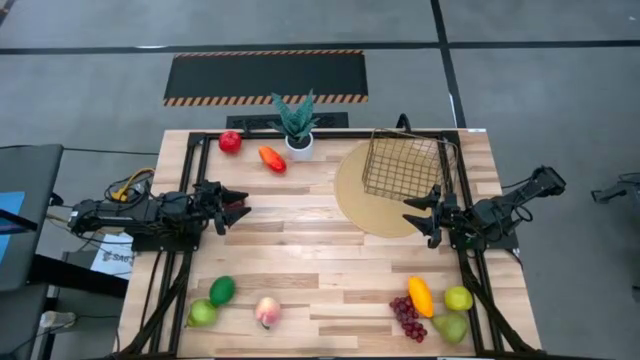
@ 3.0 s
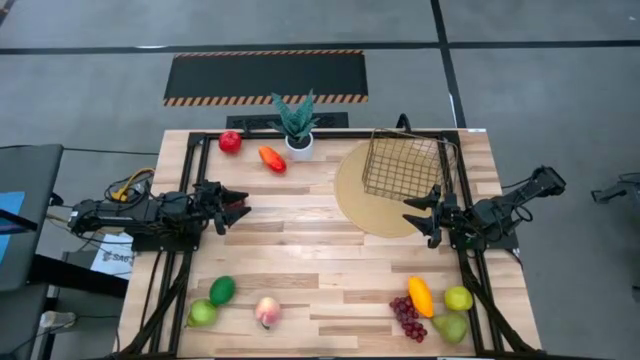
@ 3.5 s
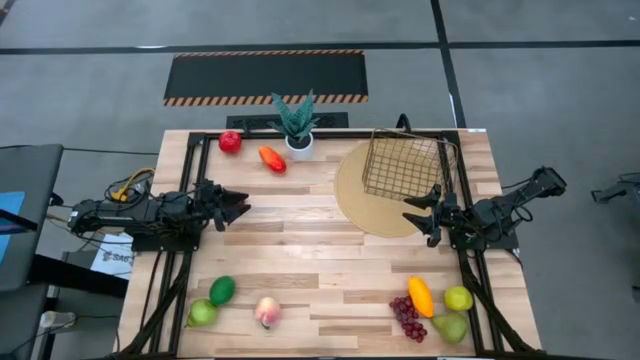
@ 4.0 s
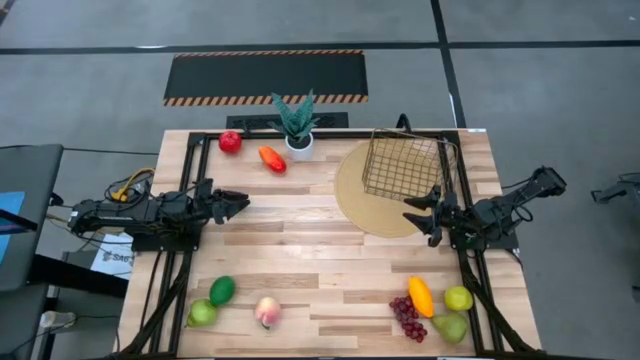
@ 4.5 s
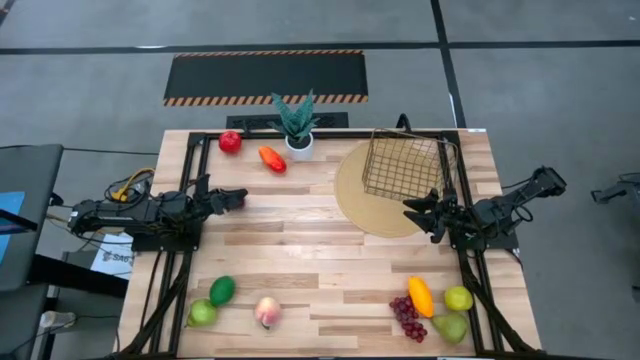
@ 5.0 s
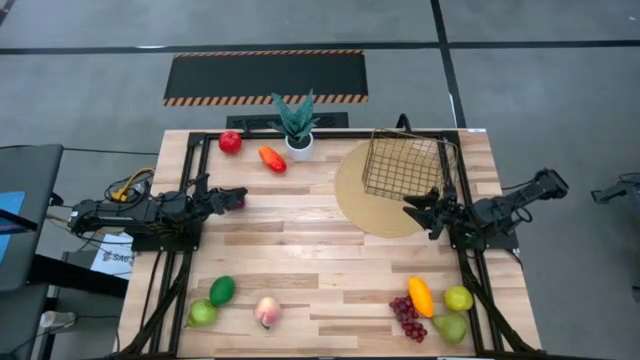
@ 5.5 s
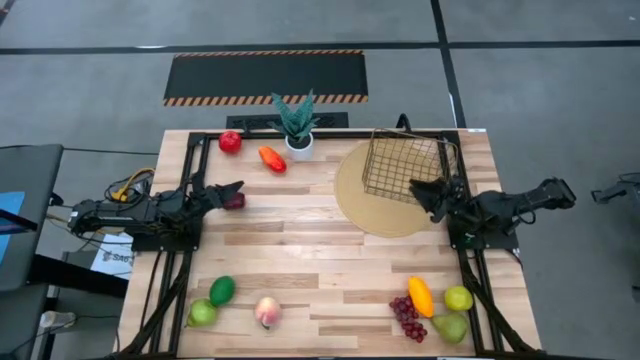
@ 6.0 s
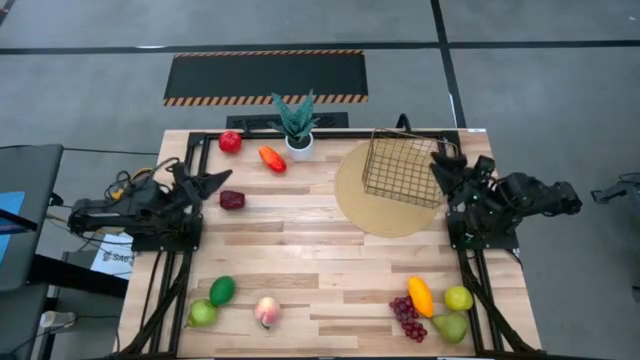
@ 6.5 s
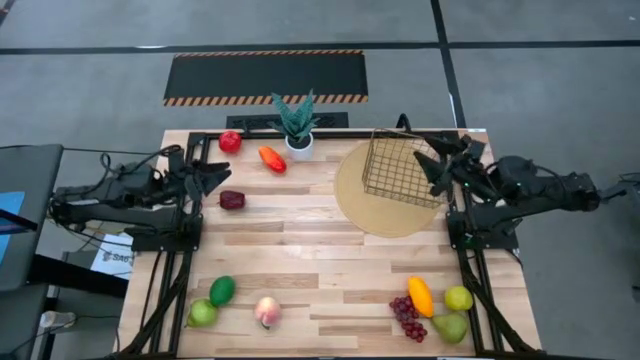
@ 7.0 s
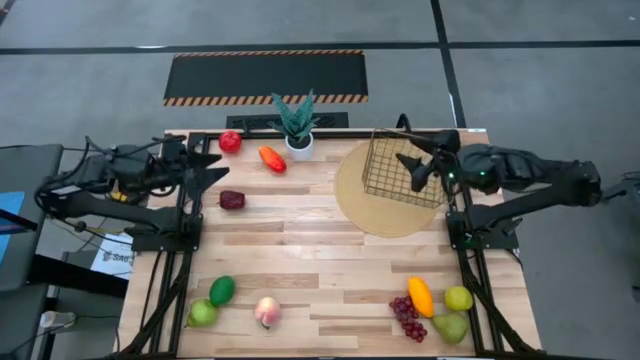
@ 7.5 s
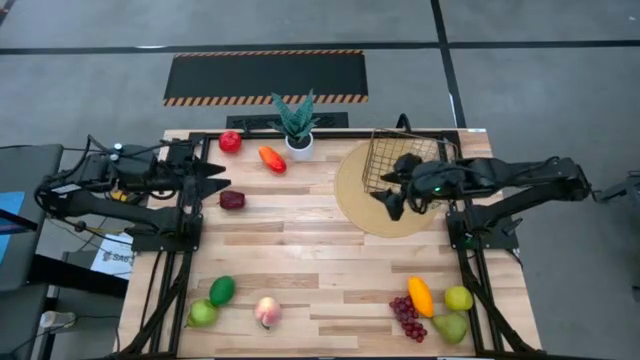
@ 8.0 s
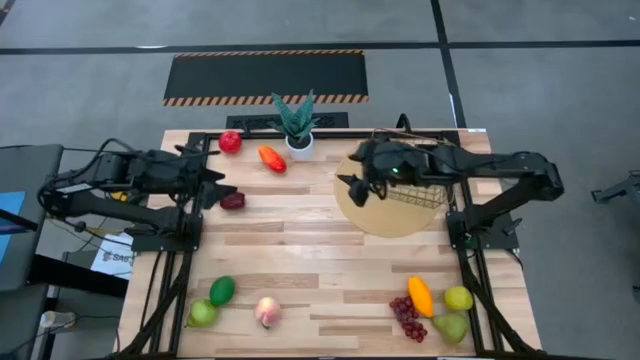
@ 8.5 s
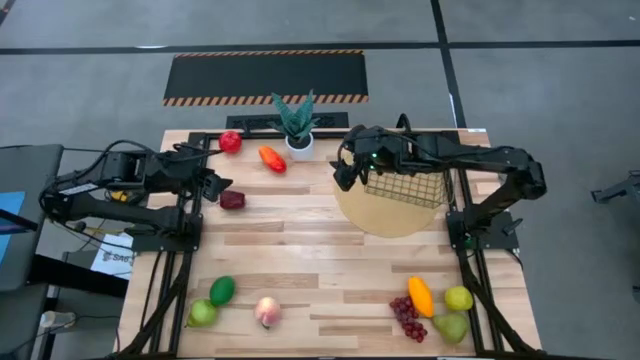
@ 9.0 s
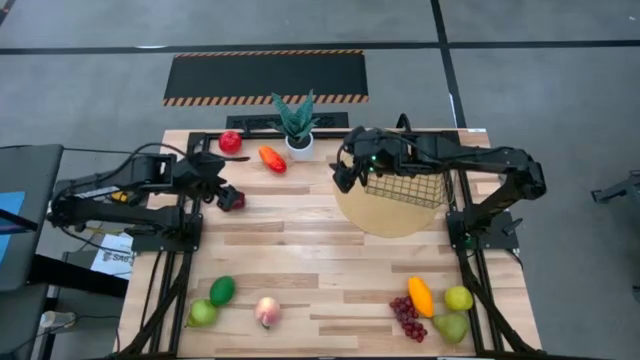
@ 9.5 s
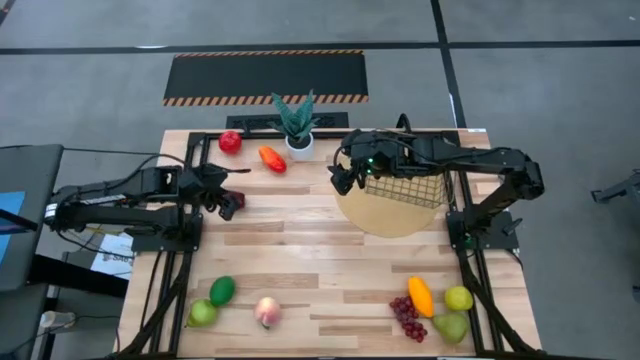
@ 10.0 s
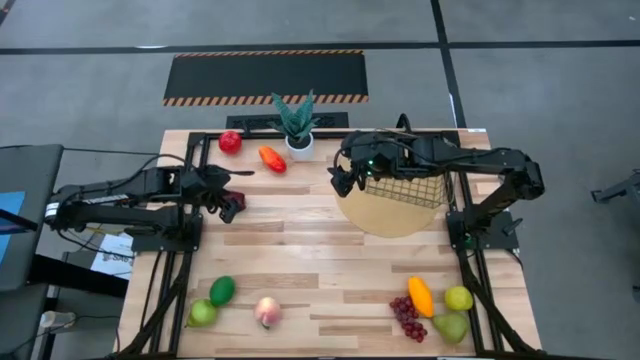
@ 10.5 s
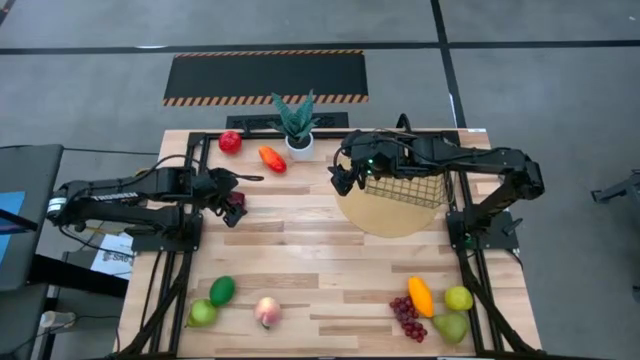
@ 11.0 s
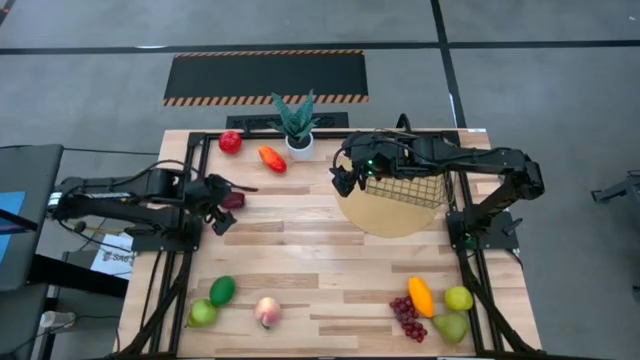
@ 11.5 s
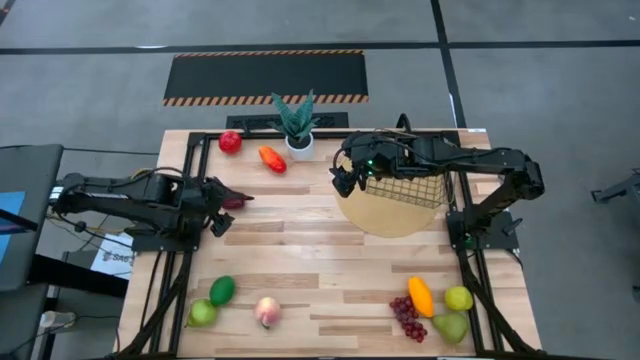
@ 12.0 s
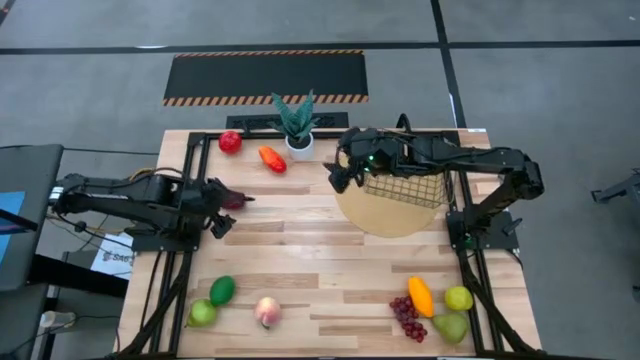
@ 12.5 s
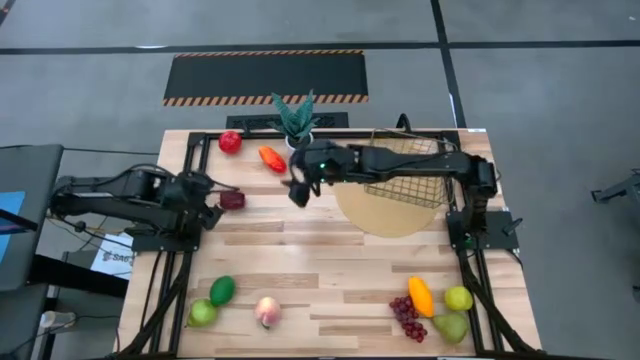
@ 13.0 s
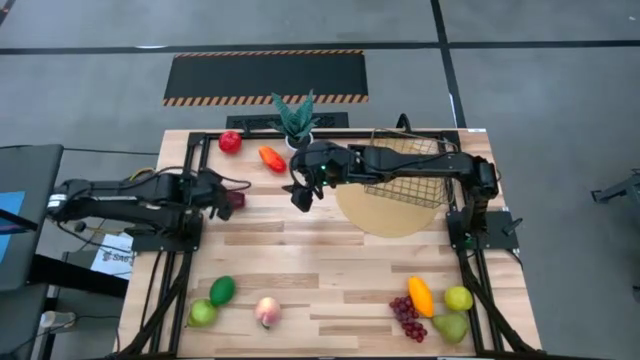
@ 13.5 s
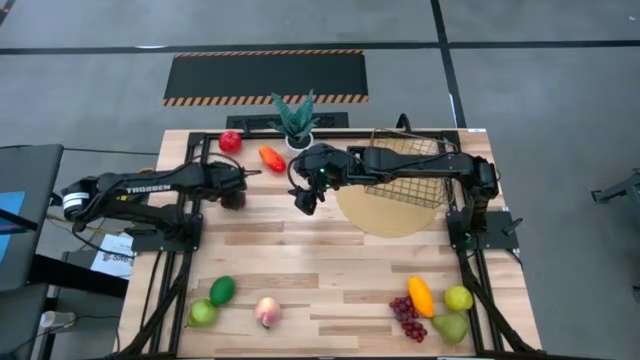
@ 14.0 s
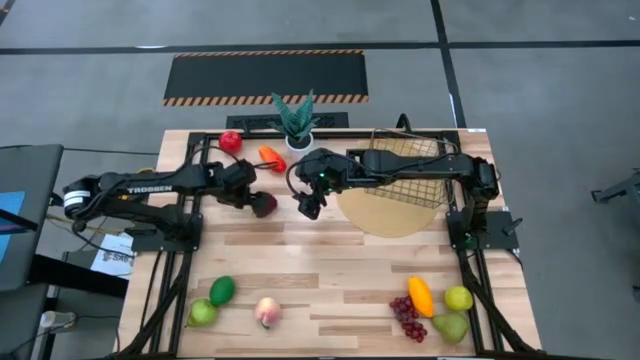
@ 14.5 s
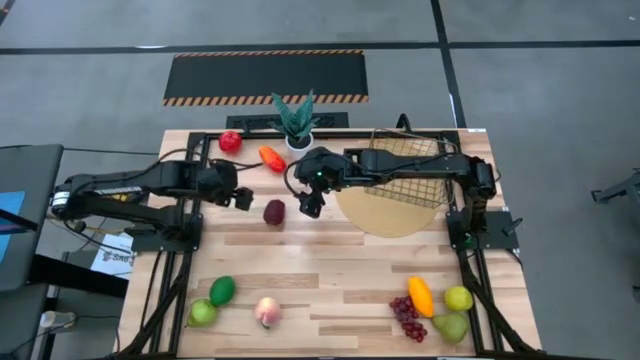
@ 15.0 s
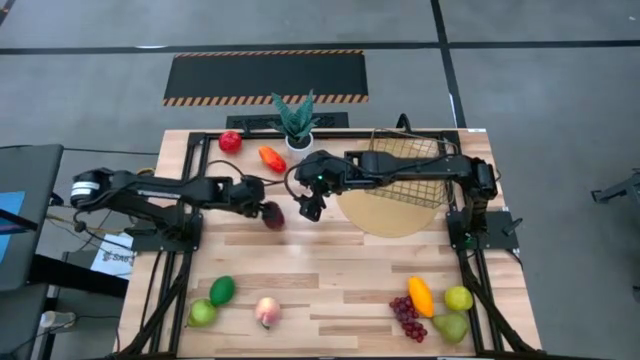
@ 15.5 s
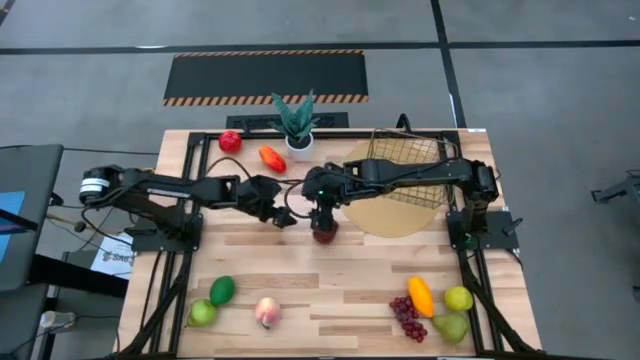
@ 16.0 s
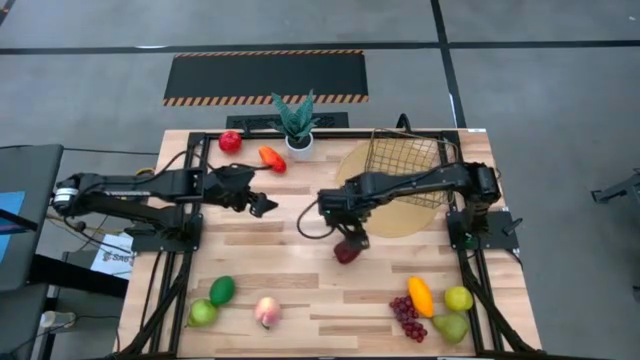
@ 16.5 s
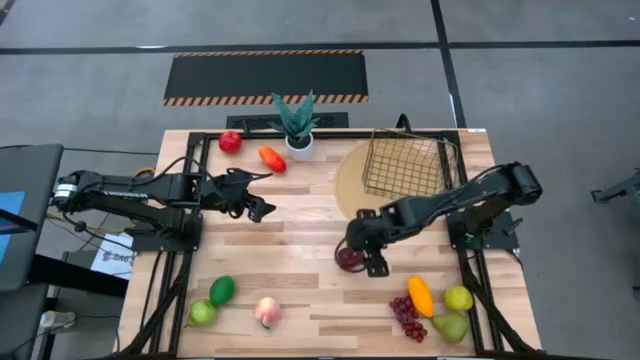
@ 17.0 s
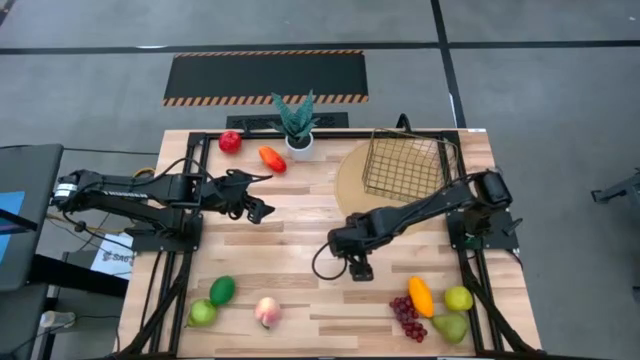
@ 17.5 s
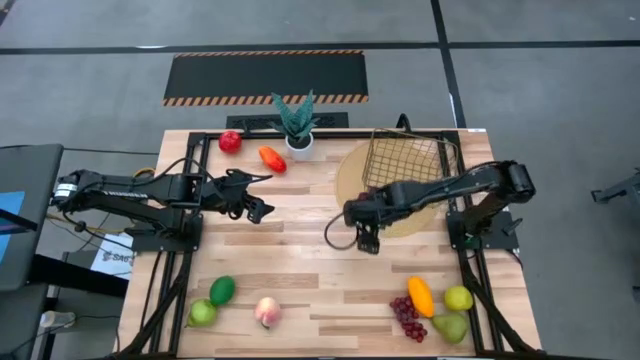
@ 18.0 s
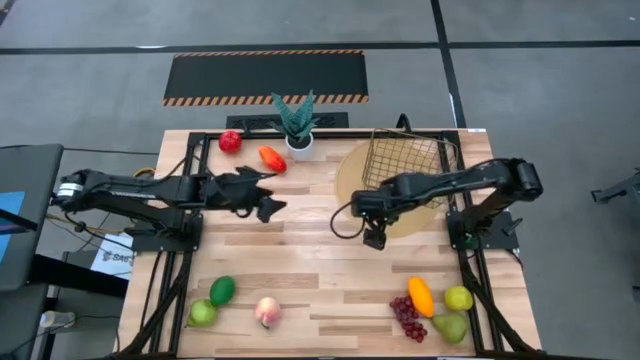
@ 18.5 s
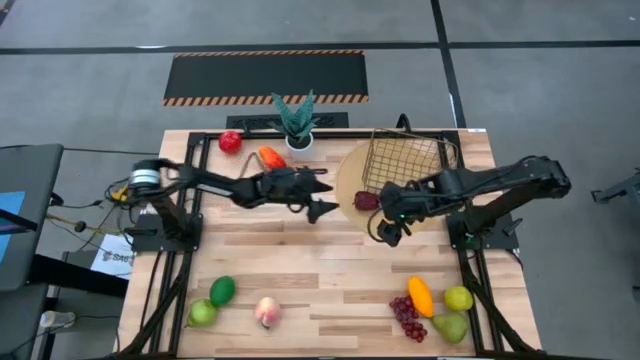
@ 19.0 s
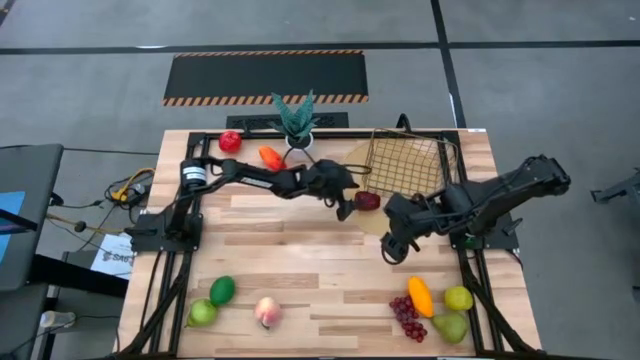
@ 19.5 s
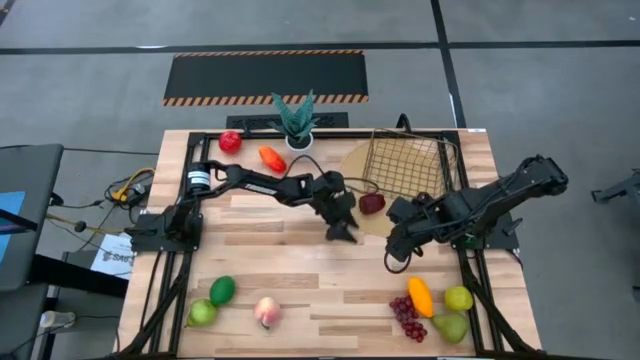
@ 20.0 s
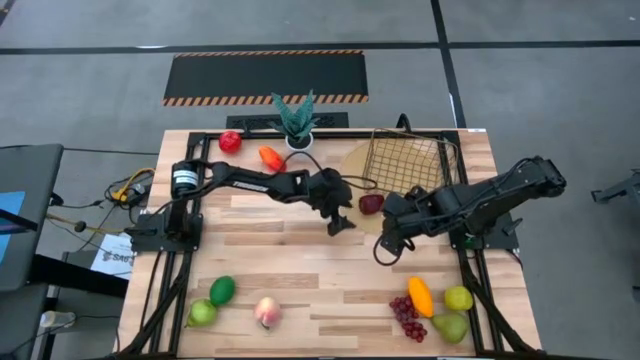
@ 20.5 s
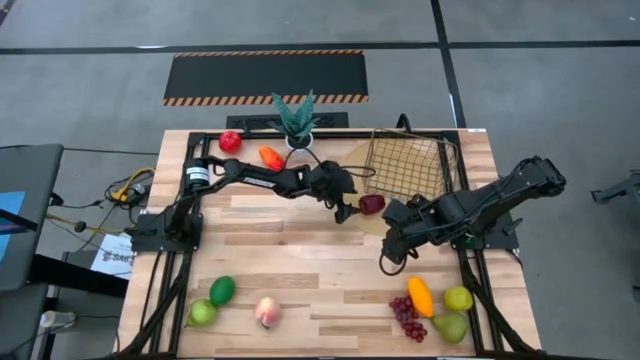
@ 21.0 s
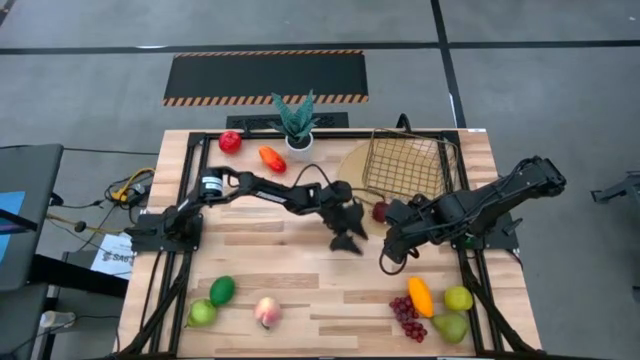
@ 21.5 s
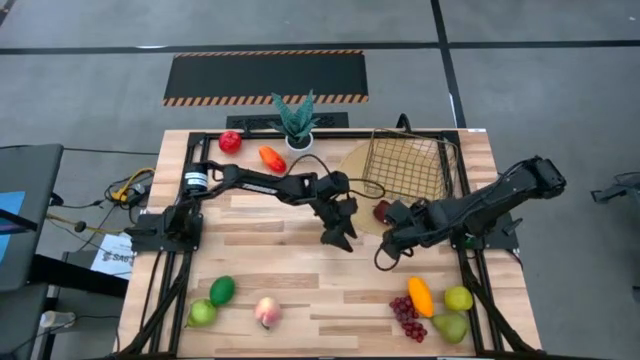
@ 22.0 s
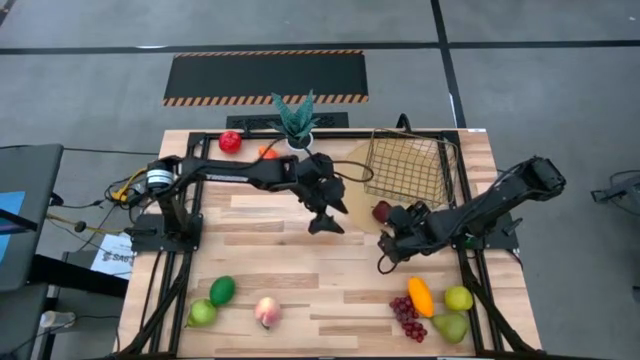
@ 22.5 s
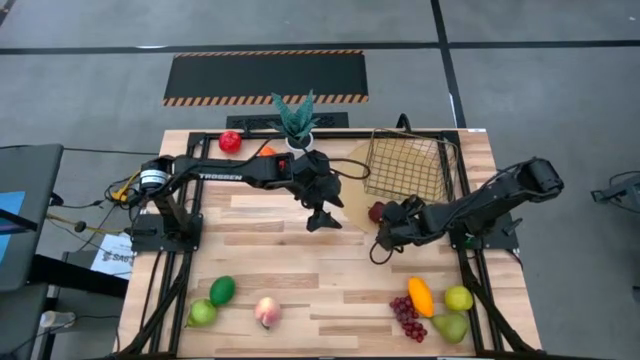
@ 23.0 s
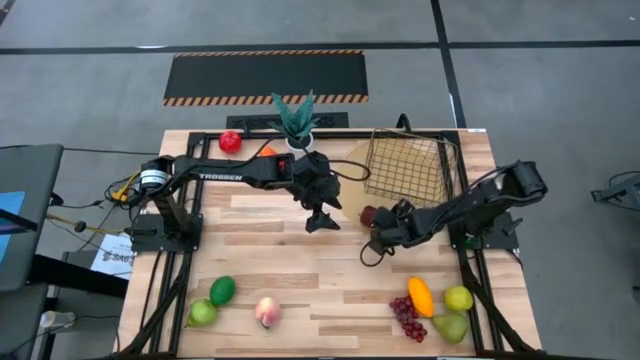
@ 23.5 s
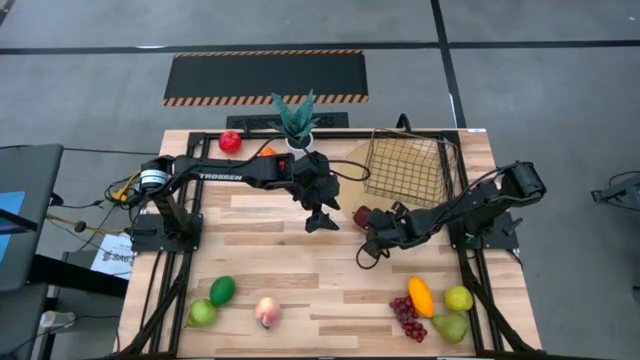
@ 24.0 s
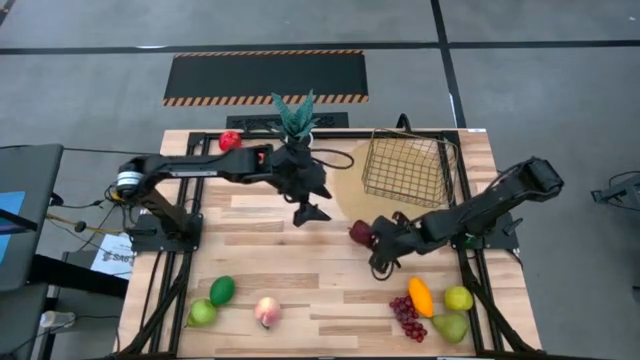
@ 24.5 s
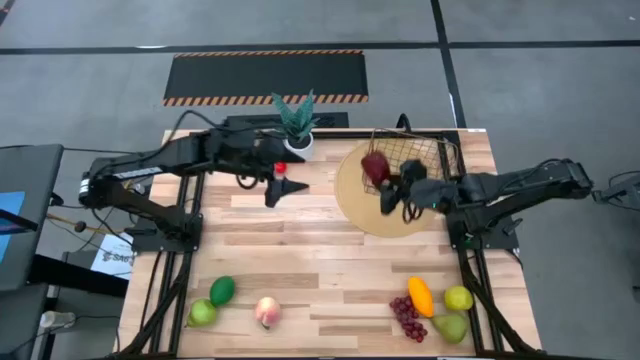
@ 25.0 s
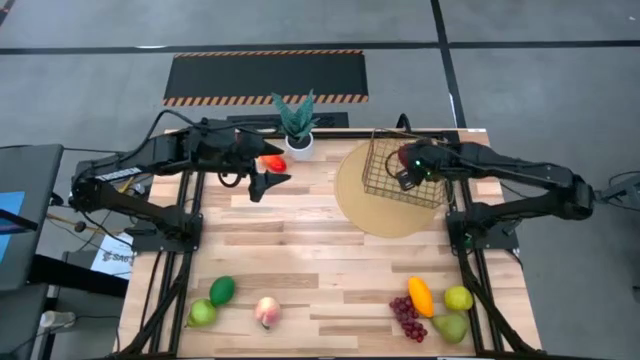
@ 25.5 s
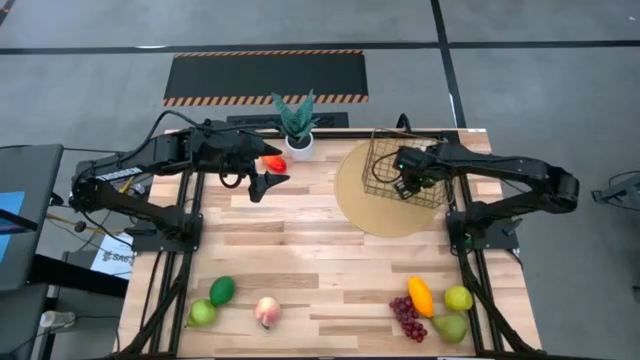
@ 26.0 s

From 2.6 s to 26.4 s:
Task: Build produce basket
Put the dark red apple into the wire basket
